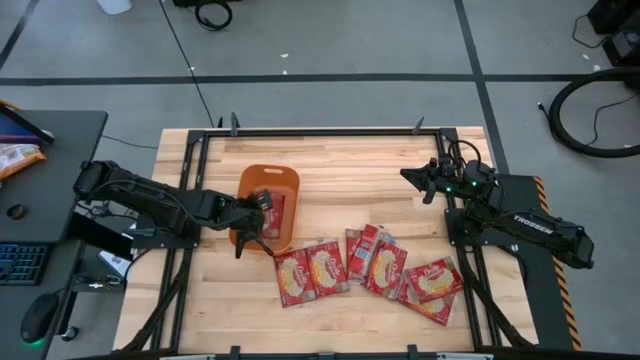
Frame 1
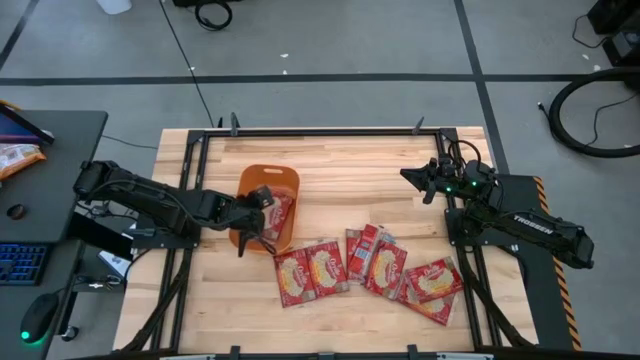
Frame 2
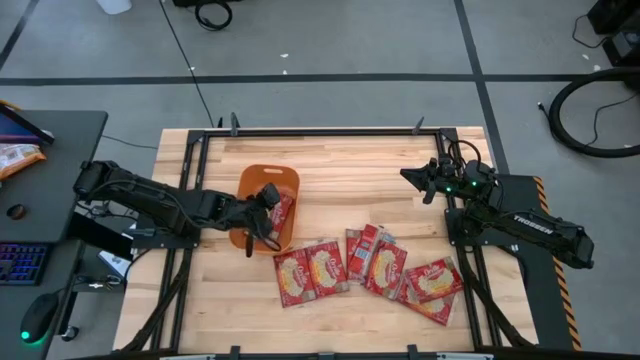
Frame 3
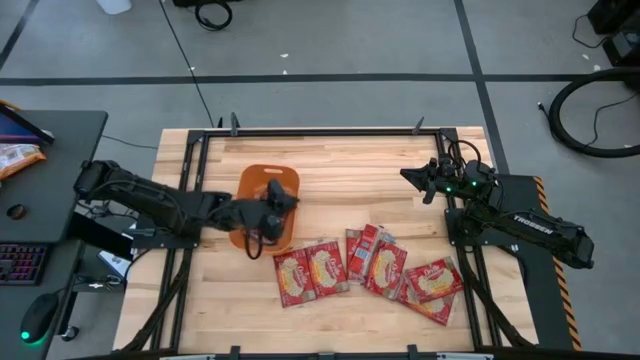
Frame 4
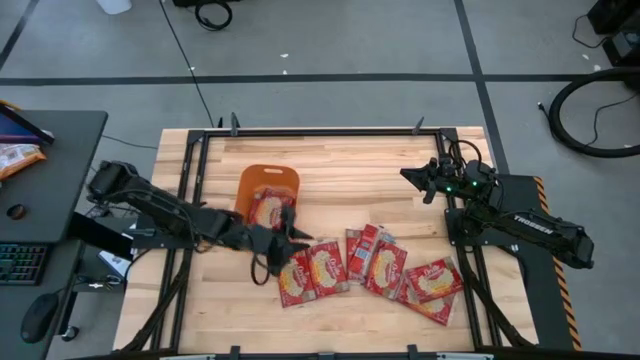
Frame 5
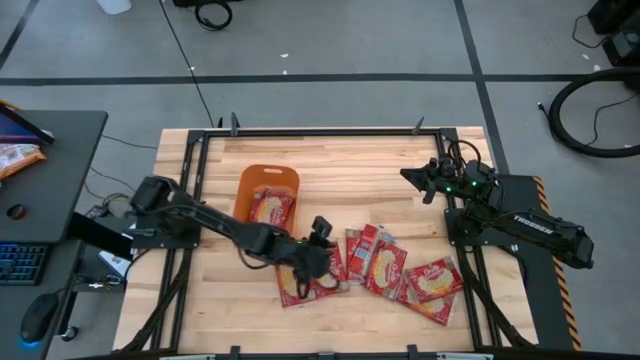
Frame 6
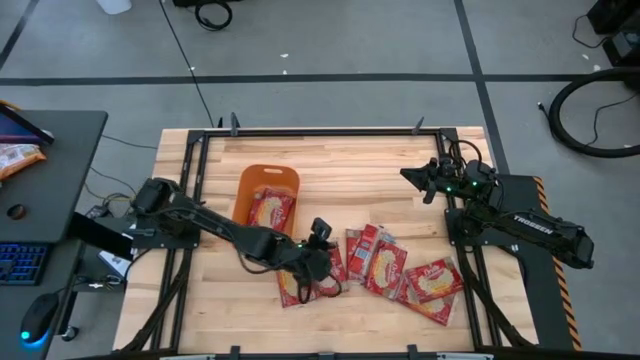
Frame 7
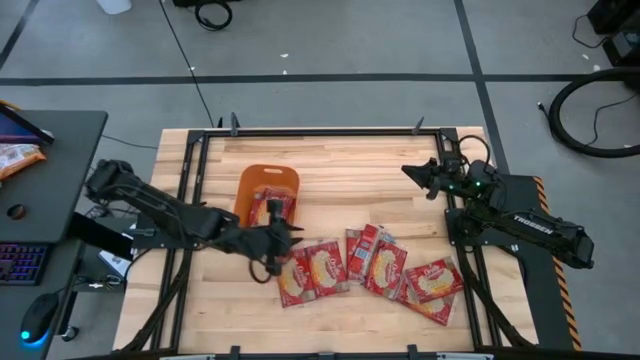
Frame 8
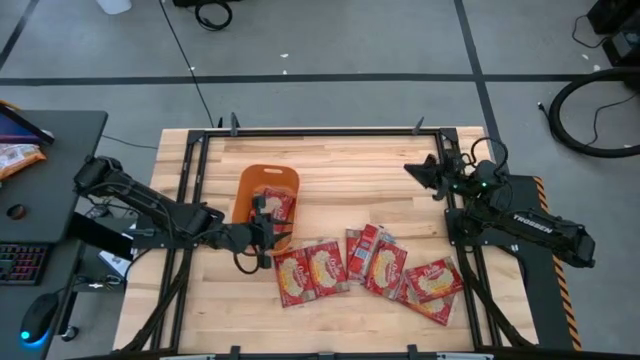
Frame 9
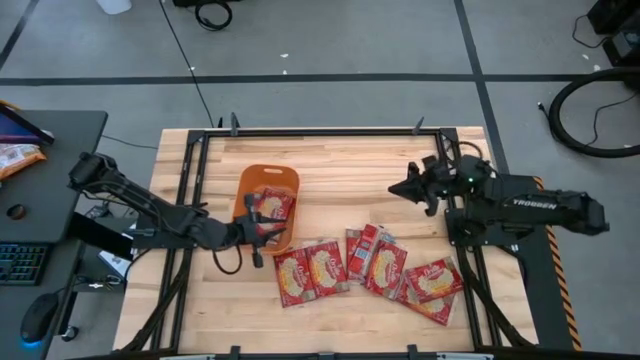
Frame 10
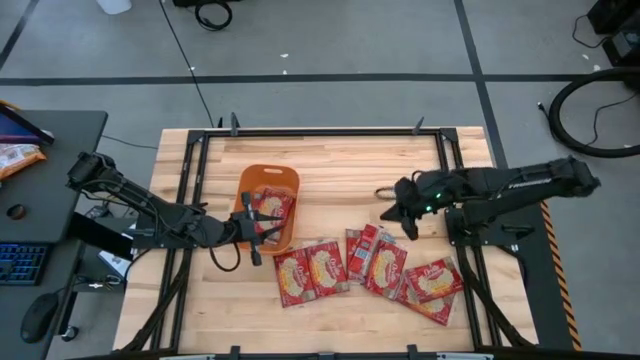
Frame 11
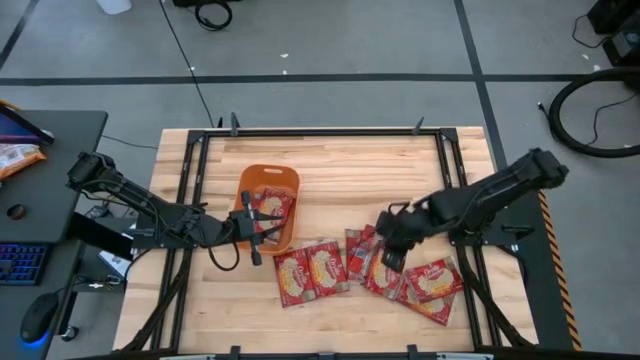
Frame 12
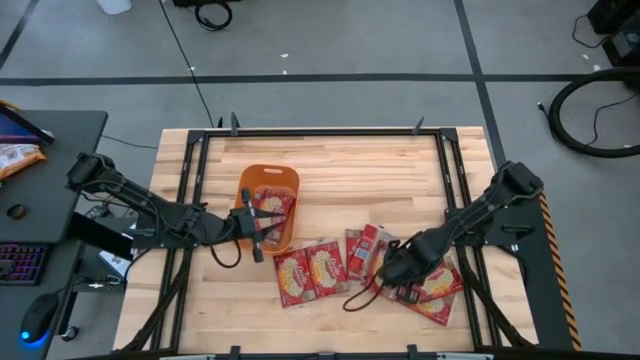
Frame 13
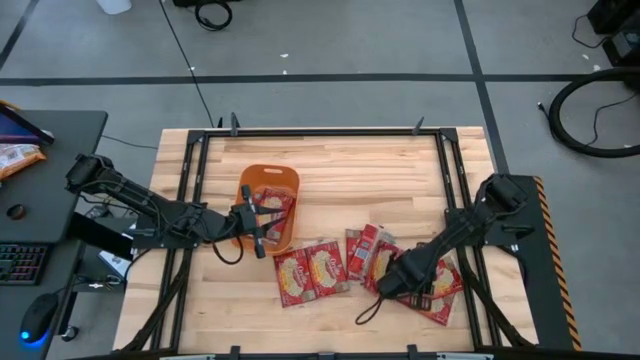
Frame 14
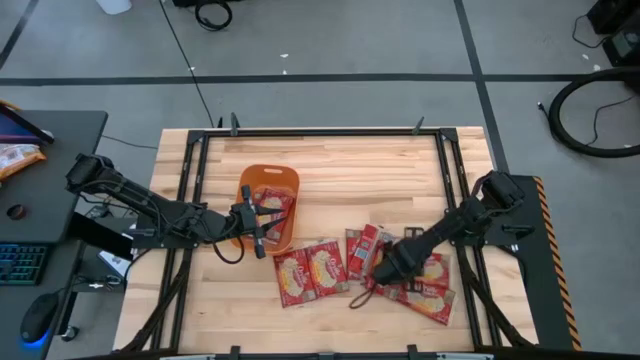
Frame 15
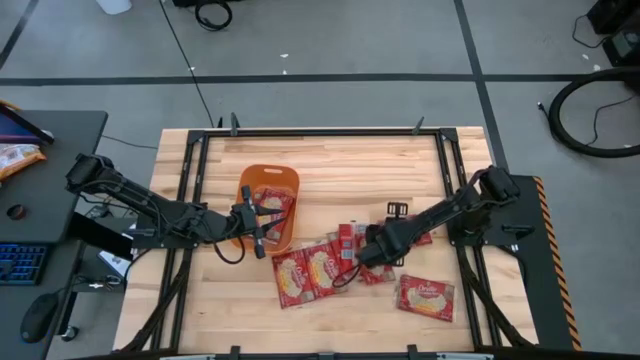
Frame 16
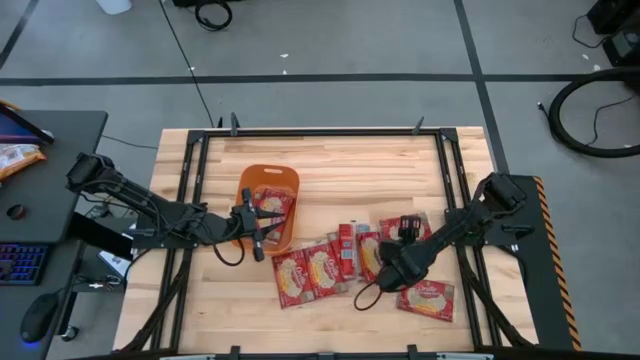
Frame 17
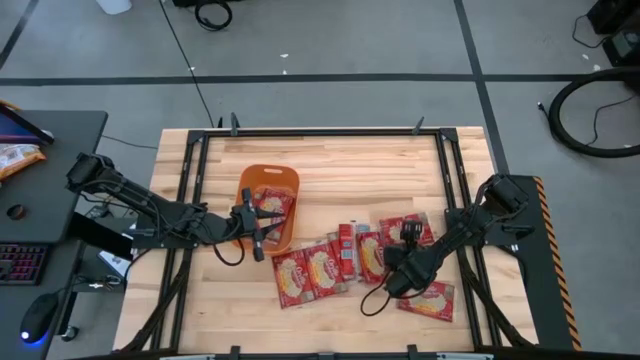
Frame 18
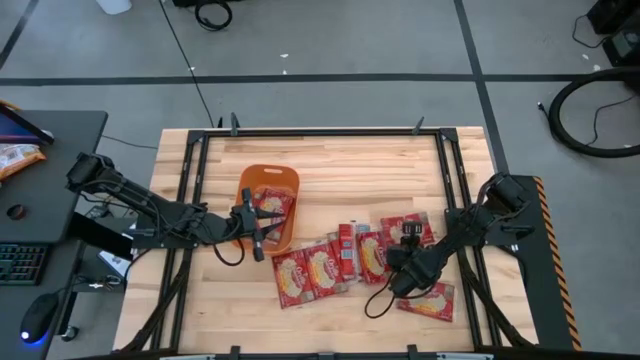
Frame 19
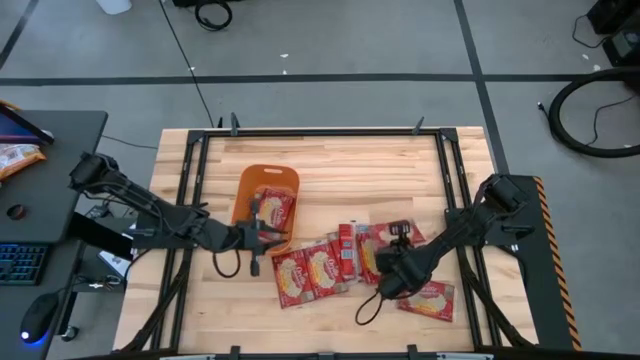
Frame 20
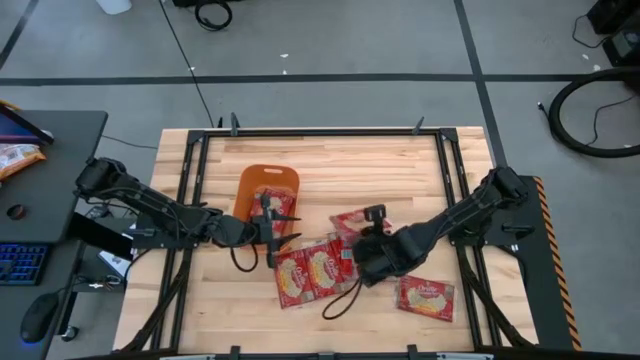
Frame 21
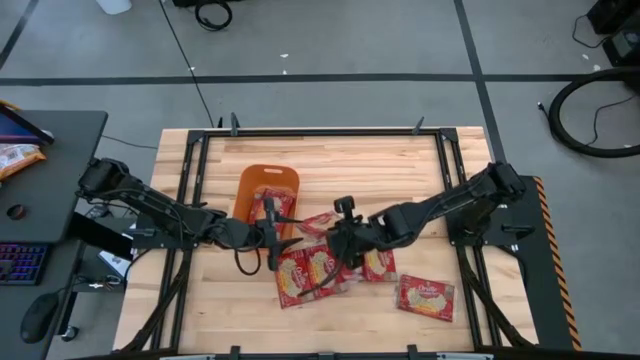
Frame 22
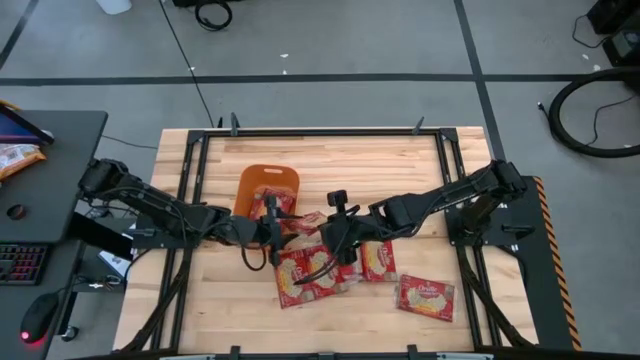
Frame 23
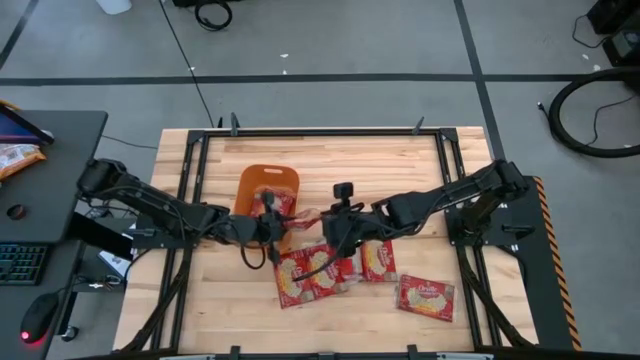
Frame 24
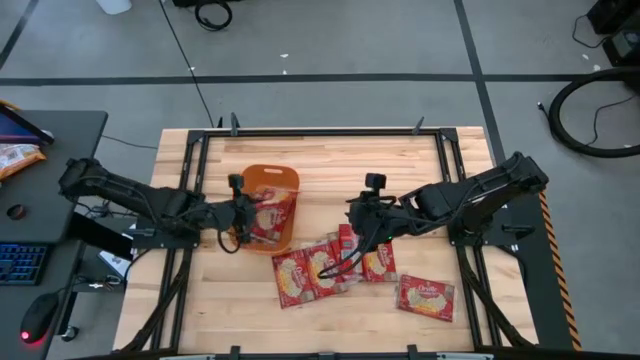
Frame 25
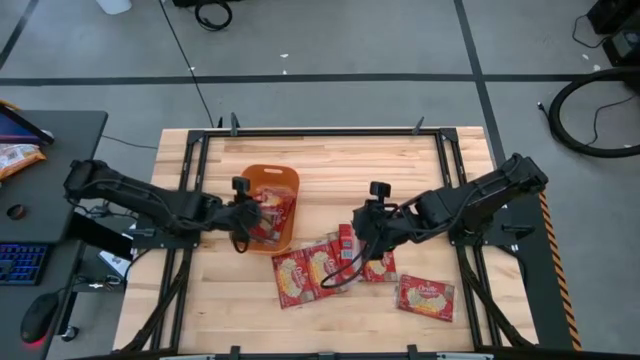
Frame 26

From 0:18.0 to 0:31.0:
Task: Sort popcorn bags into baskets
Put the red popcorn bag into the orange bin

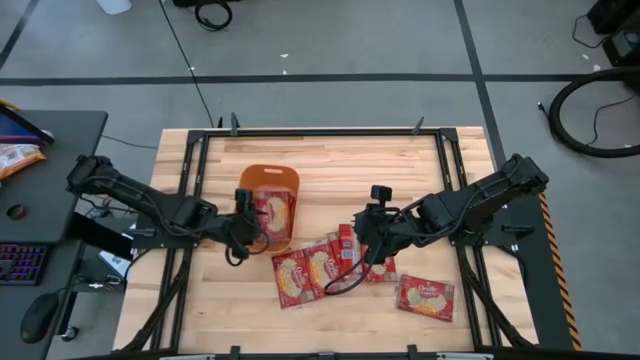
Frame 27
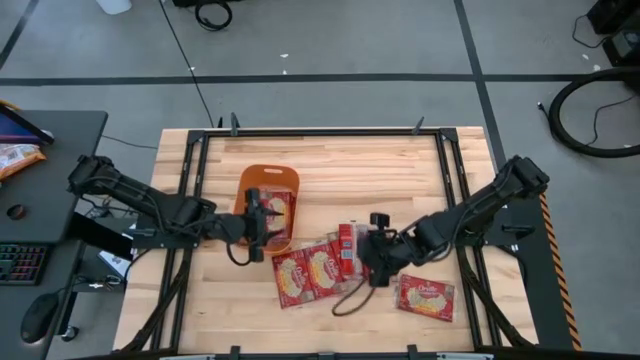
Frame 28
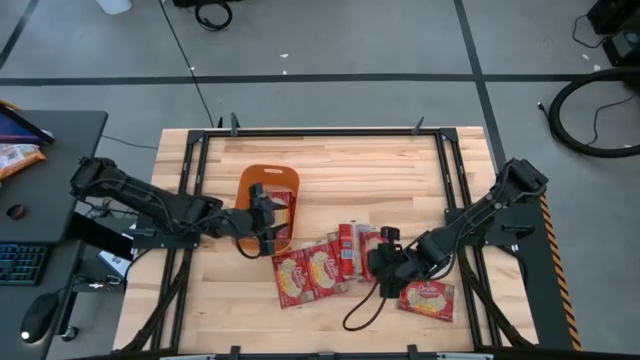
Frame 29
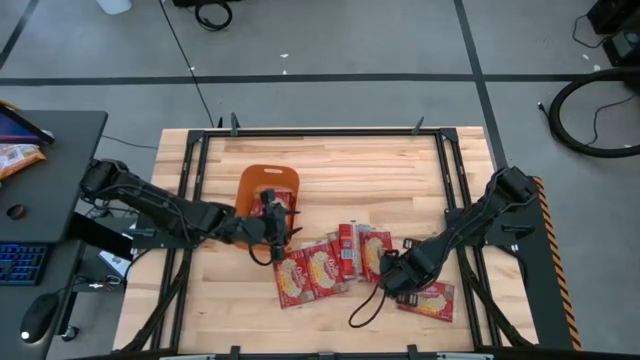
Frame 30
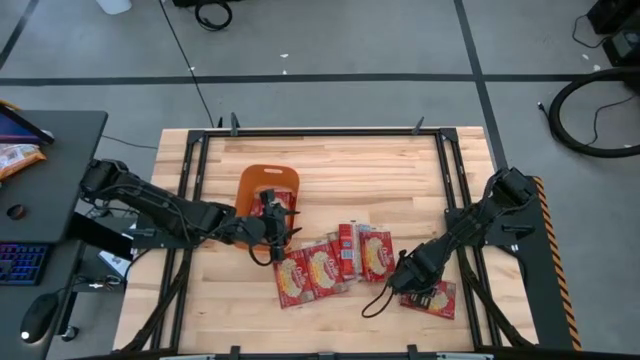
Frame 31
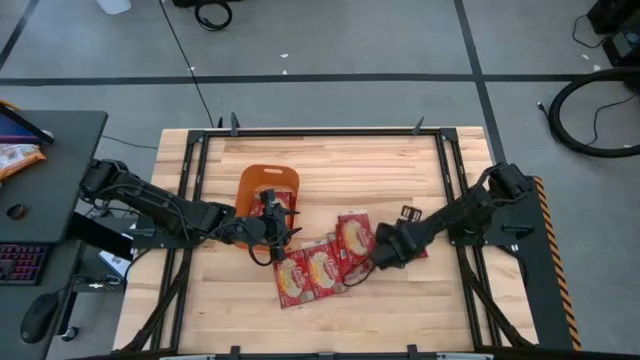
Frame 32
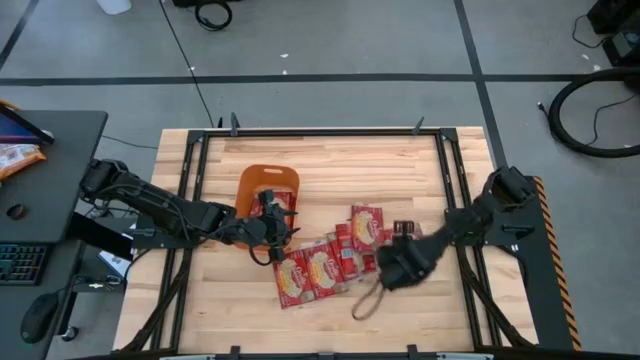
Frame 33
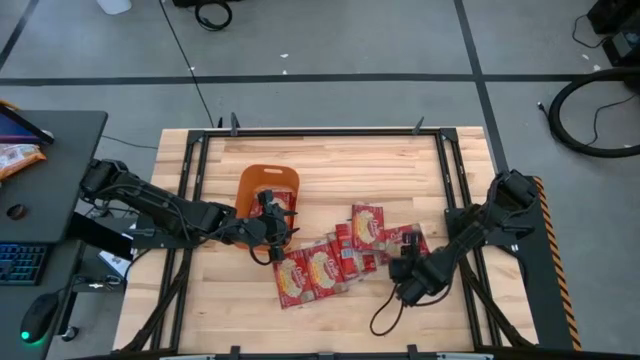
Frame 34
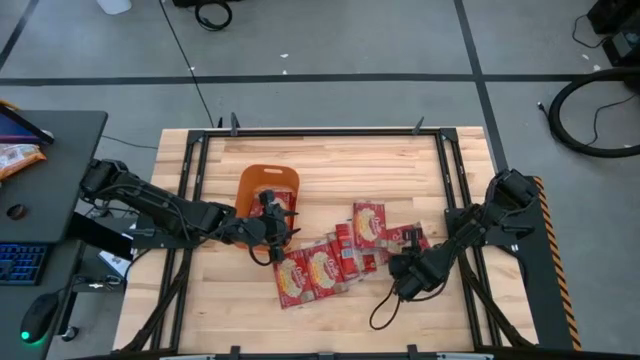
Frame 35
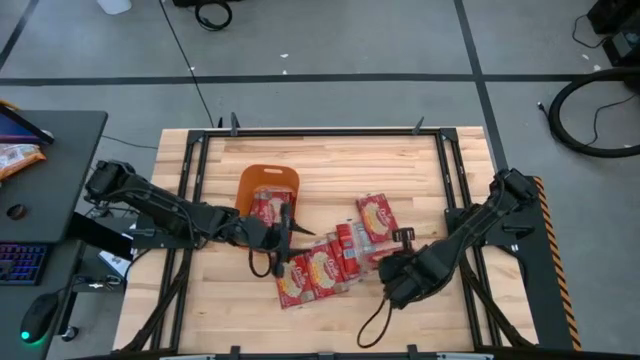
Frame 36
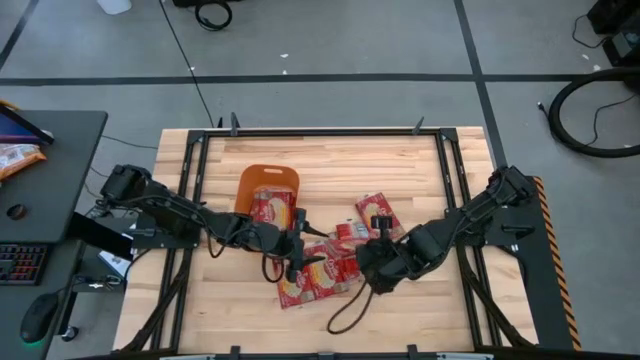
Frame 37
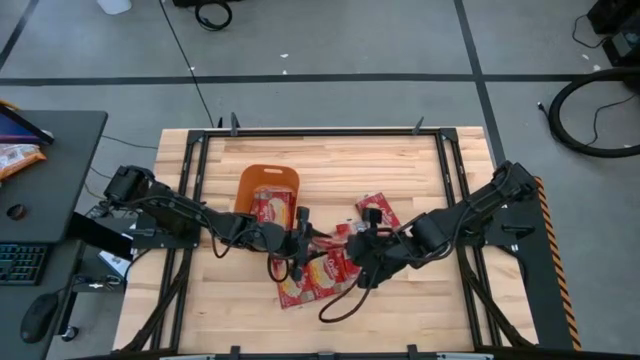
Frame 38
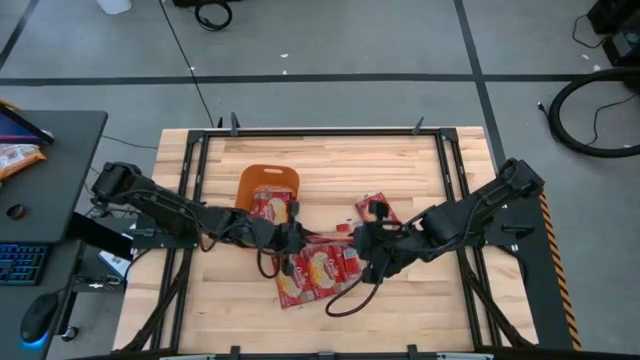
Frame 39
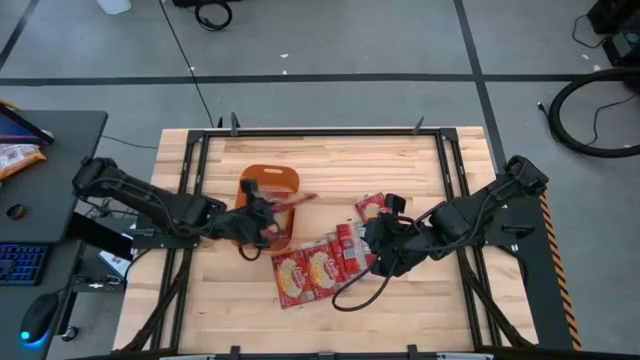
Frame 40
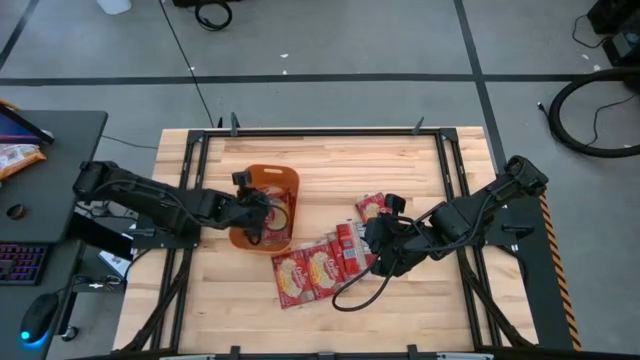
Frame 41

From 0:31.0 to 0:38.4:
Put the red popcorn bag into the orange bin

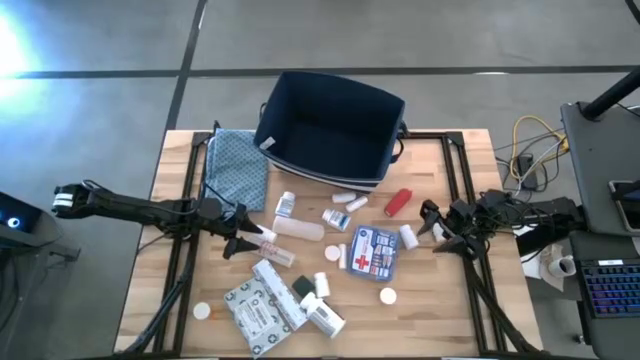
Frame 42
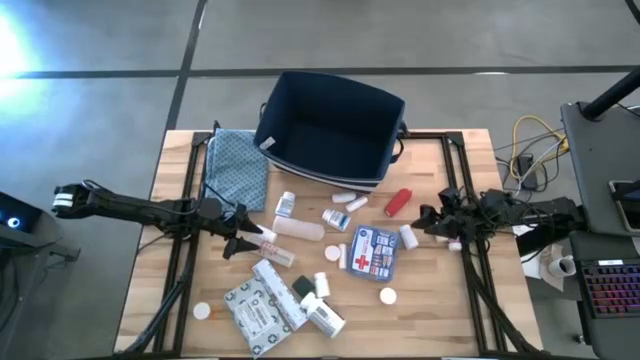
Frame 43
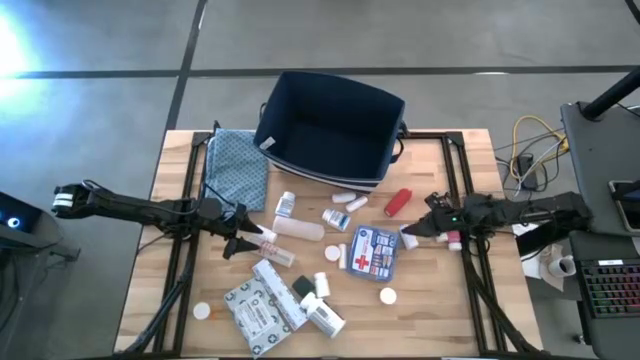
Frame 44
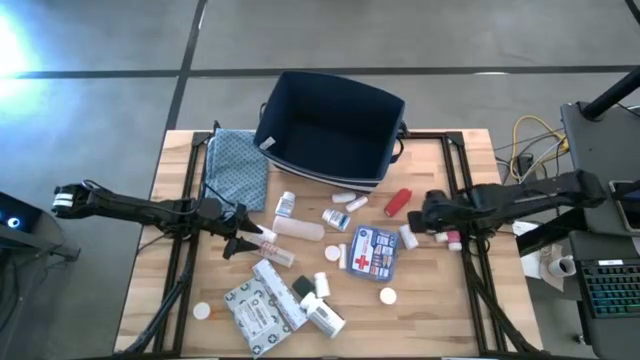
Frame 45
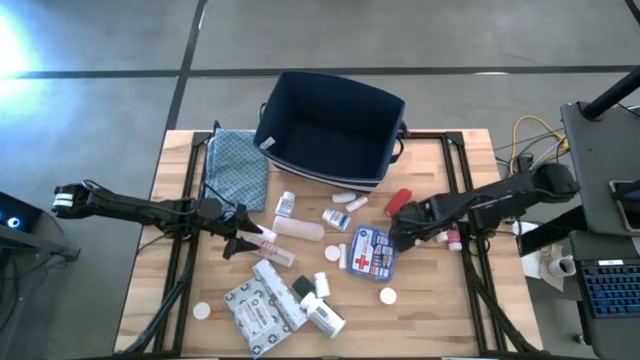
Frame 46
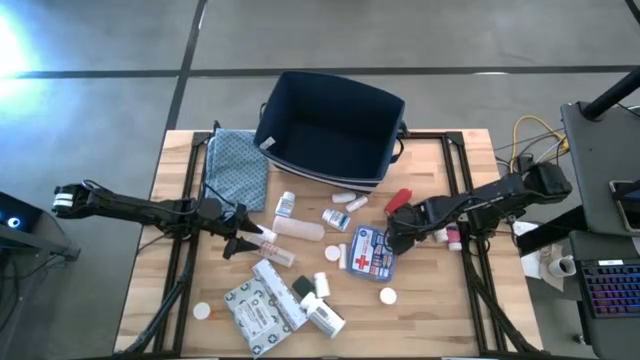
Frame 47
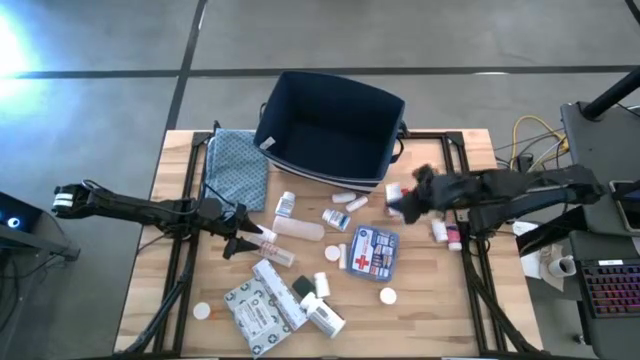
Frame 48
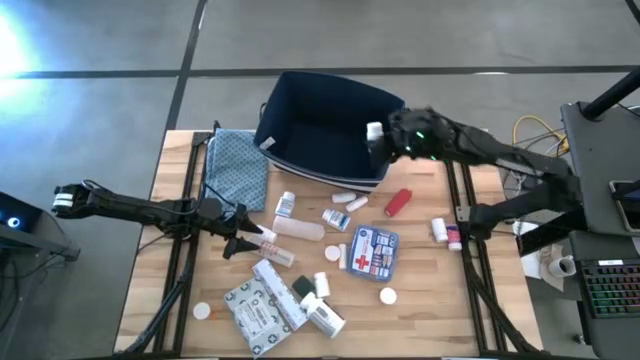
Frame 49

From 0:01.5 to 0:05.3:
Task: Pick & place medical supplies in basket/bin
Put the white pill bottle into the blue bin
